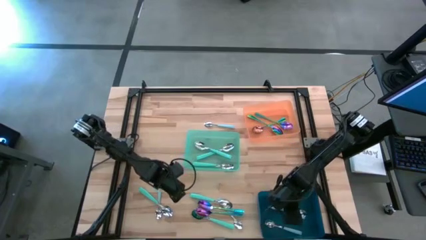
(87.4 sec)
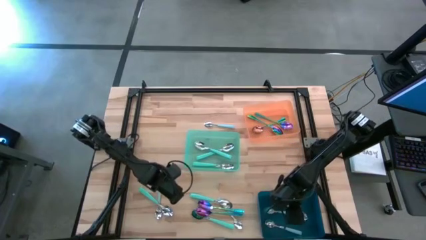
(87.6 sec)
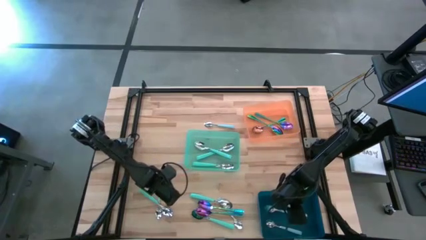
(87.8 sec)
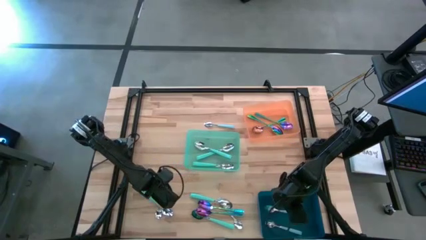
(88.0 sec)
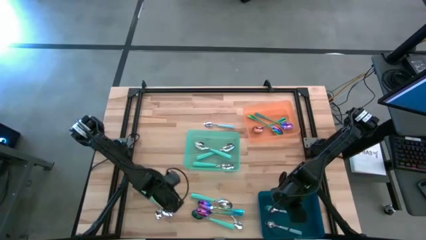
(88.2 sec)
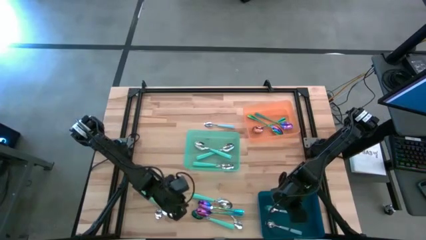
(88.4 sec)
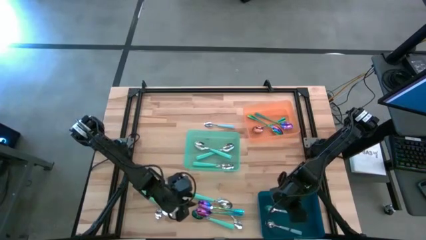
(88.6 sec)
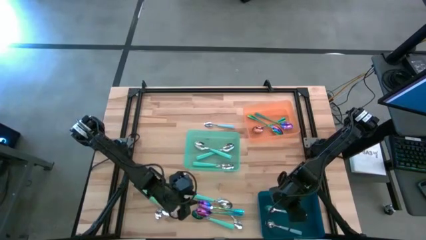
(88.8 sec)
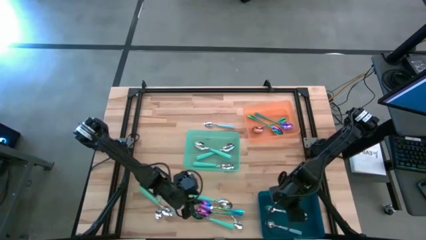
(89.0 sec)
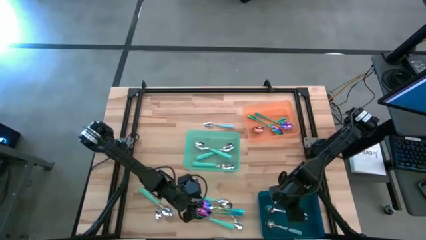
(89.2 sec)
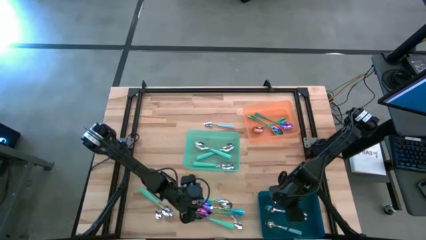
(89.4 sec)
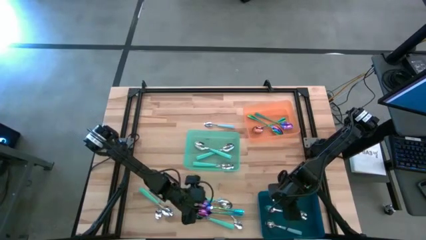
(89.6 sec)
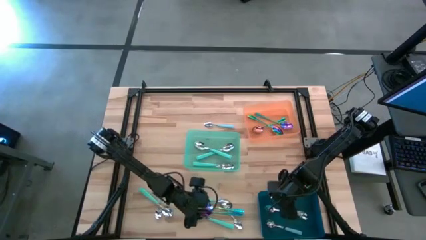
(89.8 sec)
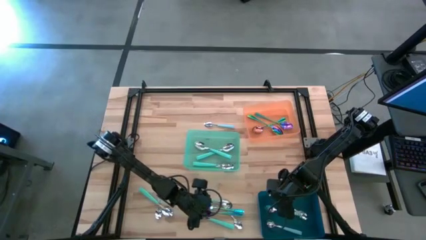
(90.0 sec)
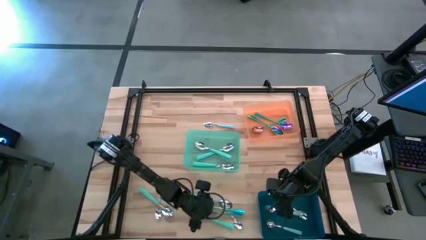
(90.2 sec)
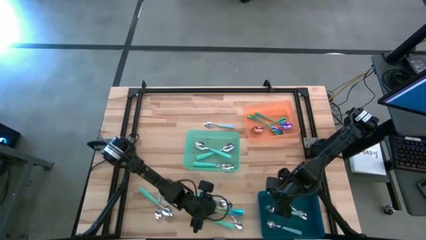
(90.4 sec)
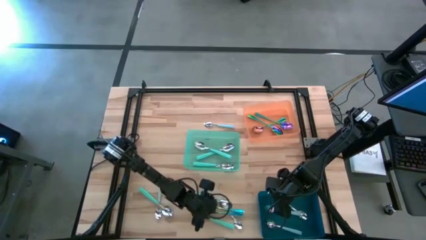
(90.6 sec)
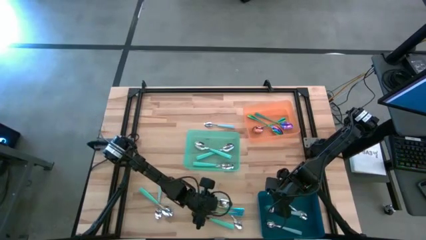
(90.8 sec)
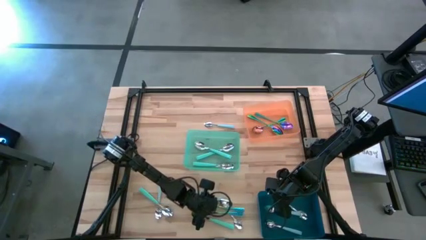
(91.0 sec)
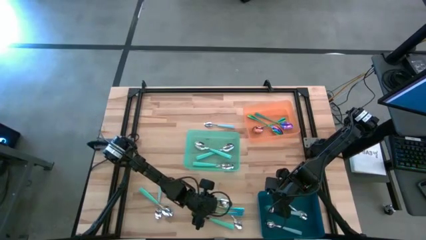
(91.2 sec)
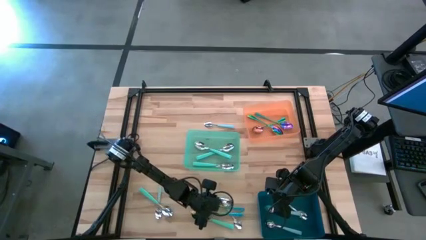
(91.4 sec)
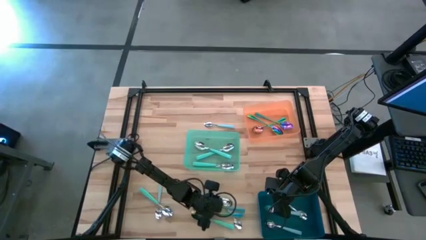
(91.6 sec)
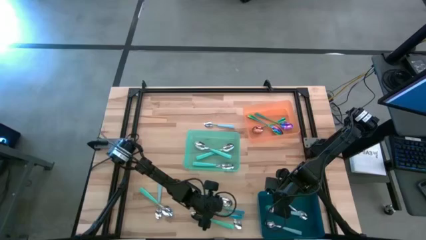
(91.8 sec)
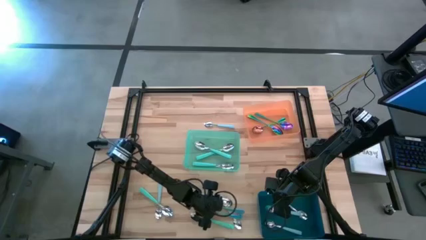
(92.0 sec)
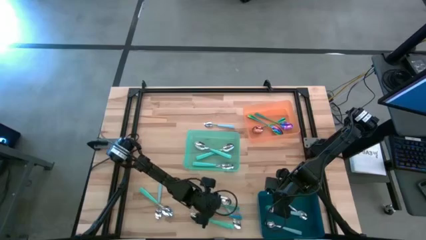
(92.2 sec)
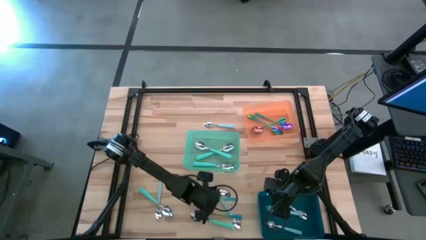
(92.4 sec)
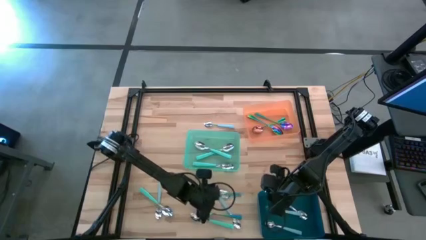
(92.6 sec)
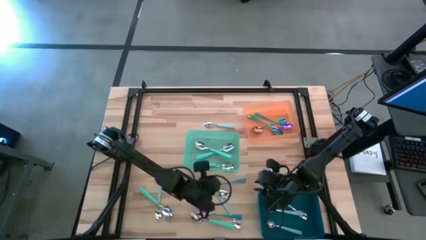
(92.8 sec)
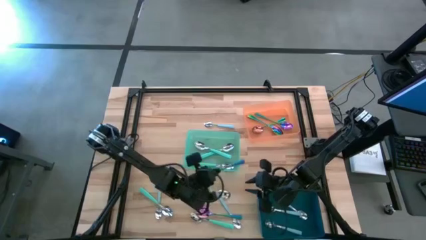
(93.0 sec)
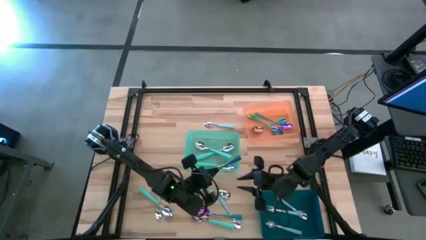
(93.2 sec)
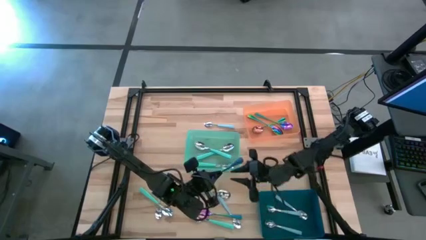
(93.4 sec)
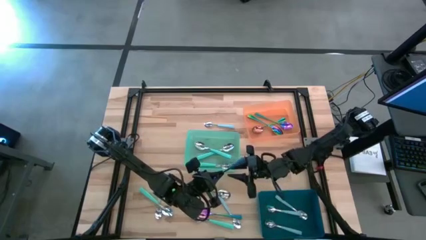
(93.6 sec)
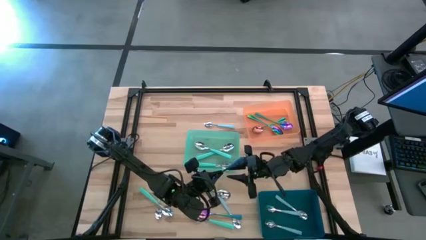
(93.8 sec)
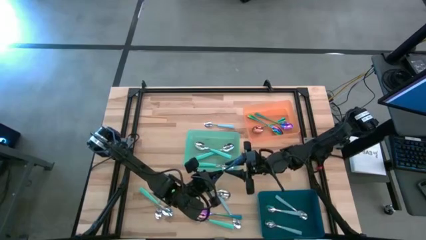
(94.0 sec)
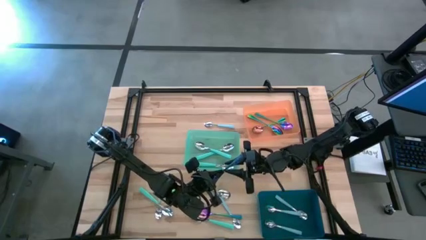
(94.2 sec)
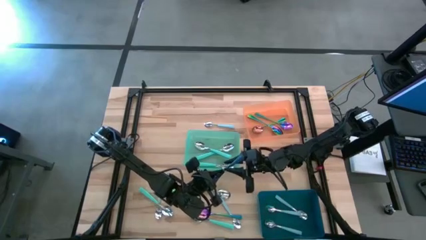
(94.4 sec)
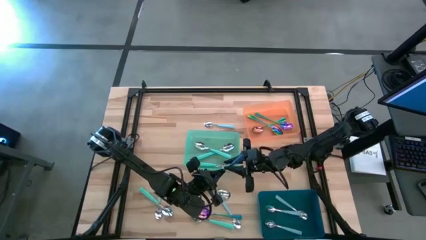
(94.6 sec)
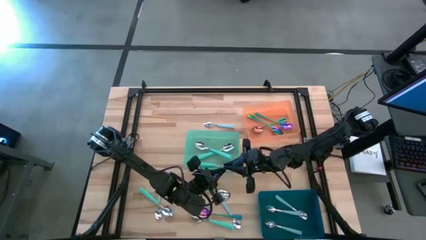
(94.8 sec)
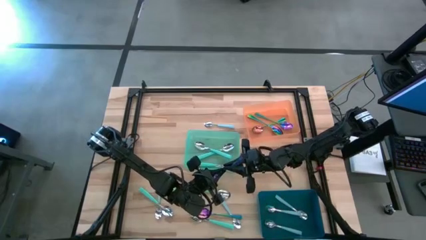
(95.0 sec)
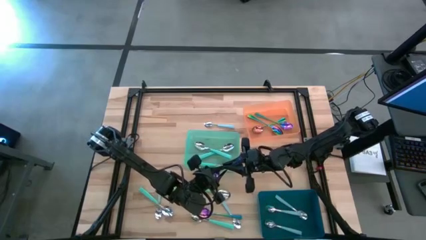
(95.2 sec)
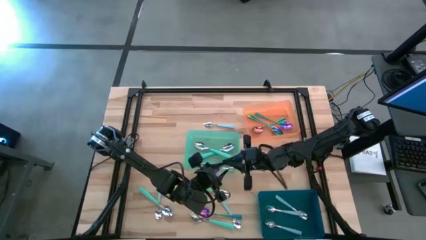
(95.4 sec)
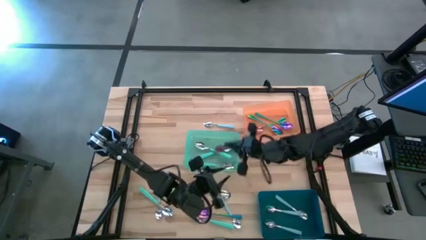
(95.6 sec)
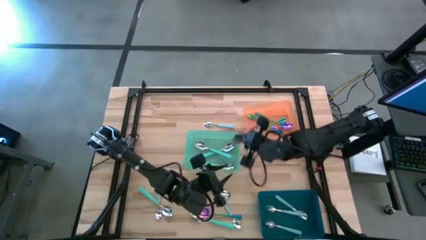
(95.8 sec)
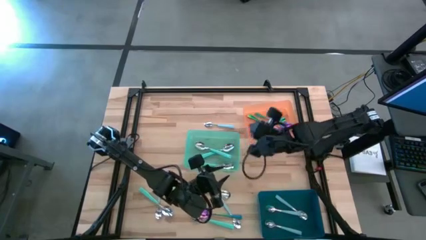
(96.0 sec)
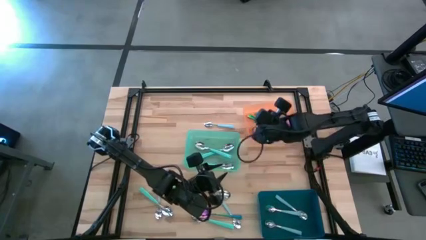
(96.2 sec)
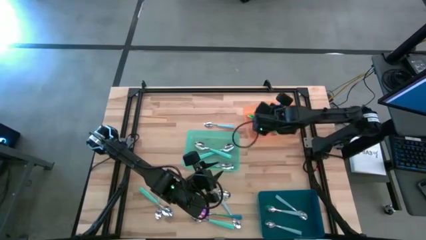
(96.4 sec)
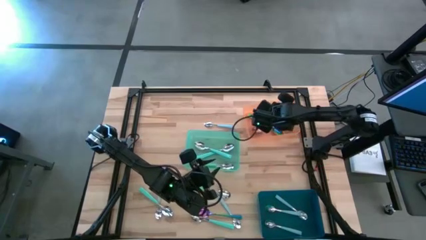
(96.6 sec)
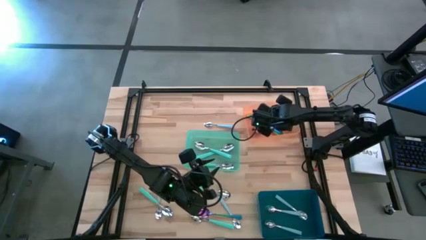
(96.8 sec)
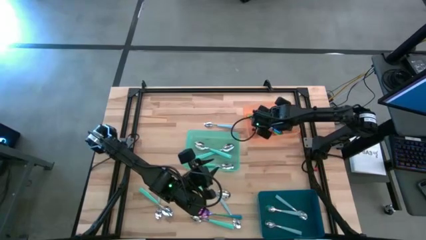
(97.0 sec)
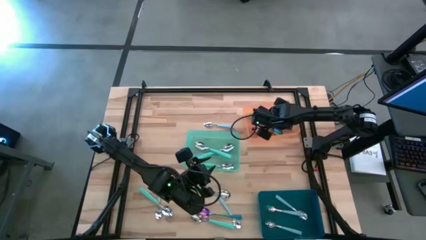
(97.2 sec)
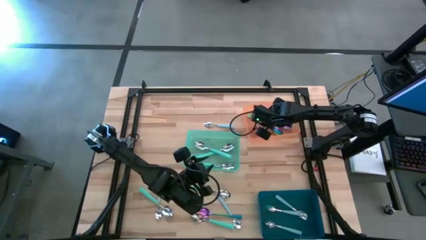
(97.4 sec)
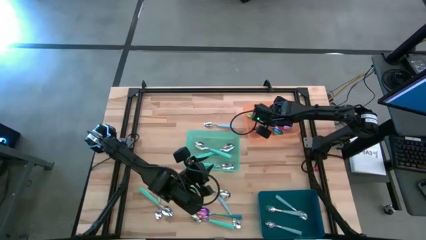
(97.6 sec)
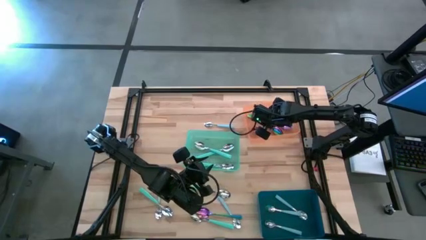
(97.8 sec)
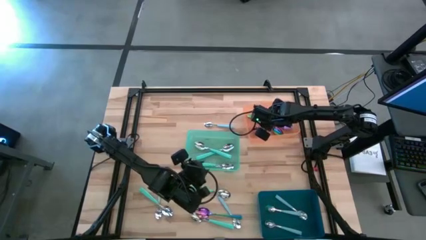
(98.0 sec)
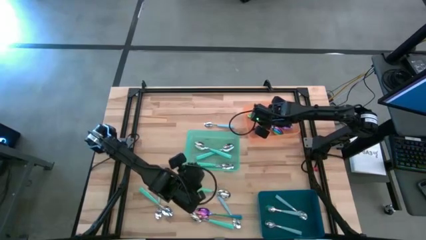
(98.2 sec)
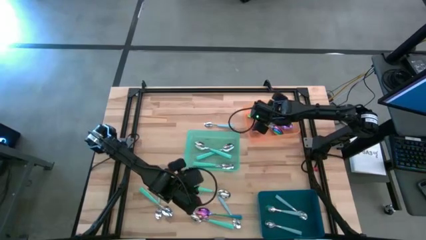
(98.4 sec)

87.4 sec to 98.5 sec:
Task: Sort silverware by color (type)
Put the violet spoon into the orange bin

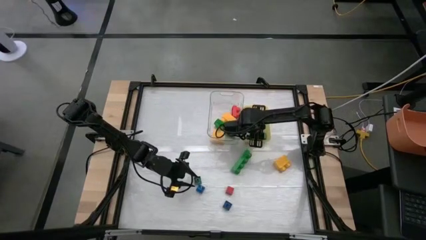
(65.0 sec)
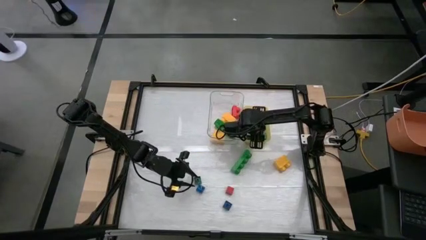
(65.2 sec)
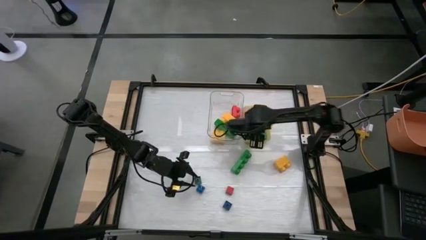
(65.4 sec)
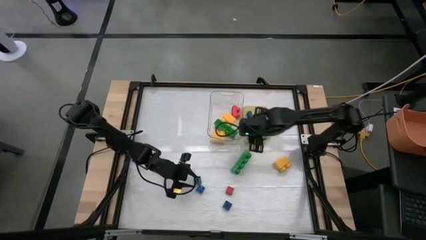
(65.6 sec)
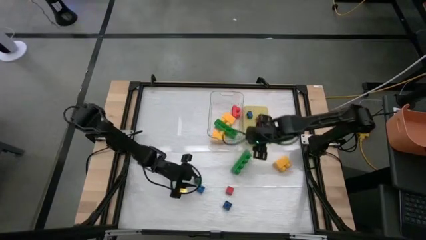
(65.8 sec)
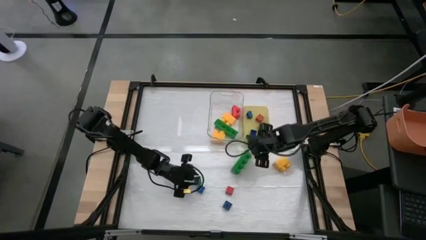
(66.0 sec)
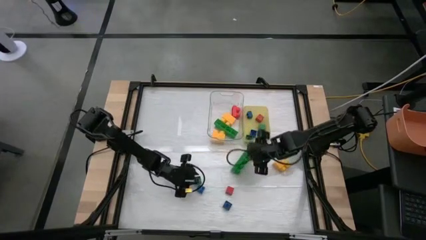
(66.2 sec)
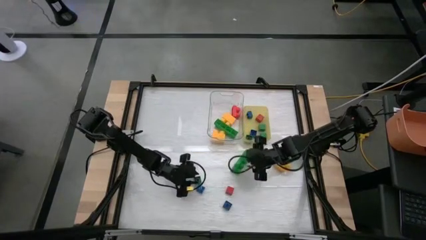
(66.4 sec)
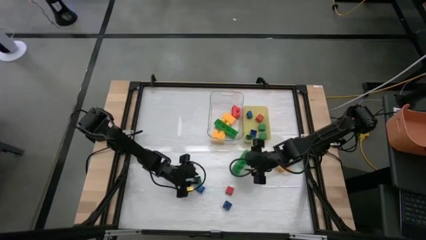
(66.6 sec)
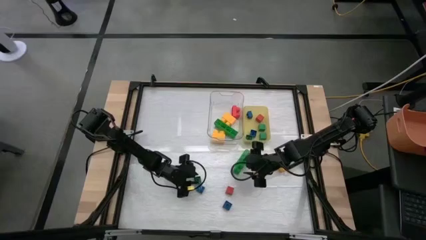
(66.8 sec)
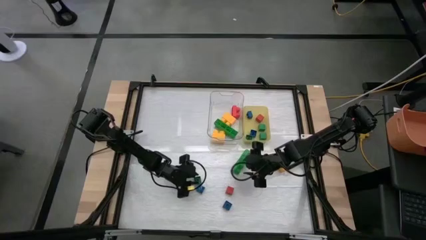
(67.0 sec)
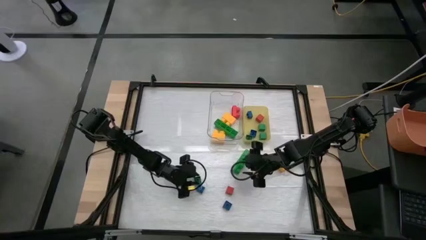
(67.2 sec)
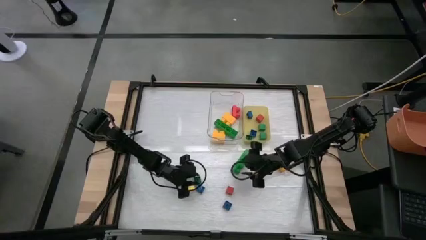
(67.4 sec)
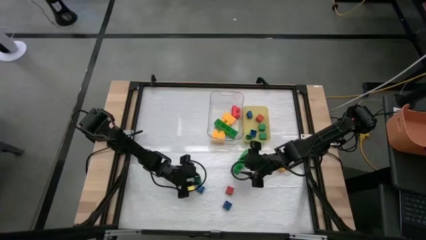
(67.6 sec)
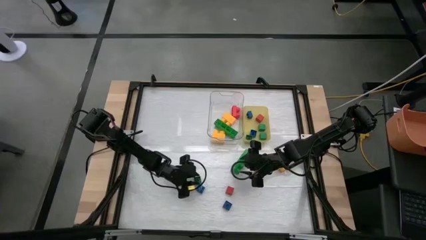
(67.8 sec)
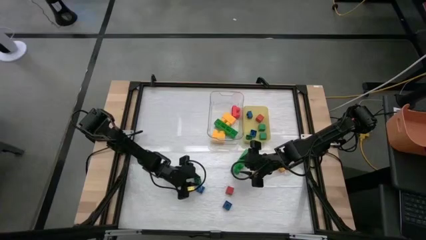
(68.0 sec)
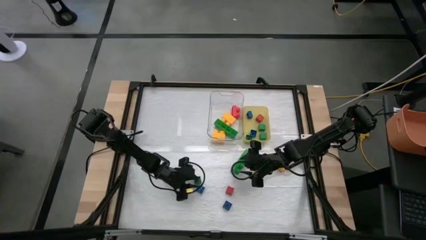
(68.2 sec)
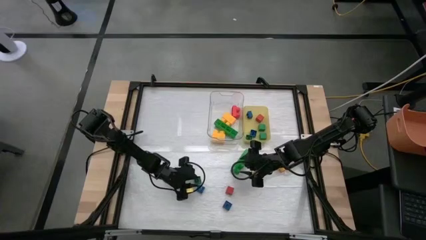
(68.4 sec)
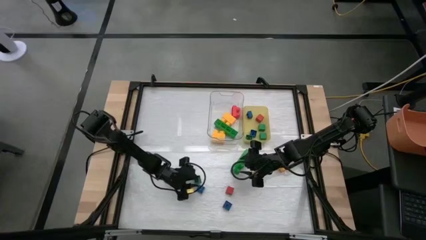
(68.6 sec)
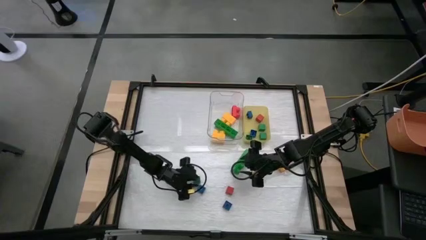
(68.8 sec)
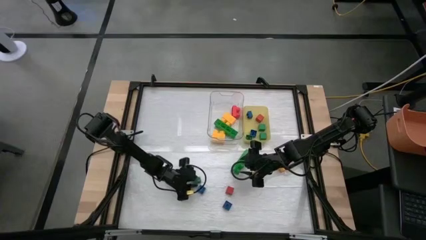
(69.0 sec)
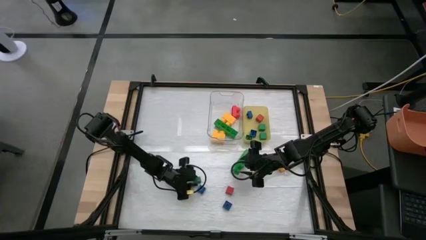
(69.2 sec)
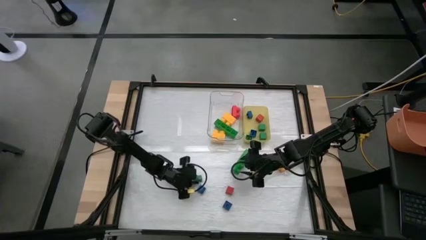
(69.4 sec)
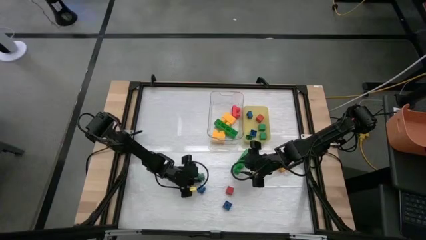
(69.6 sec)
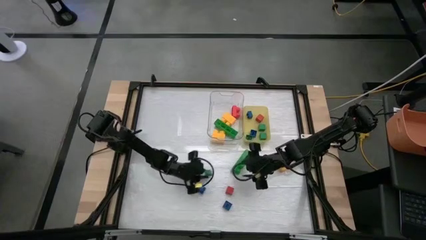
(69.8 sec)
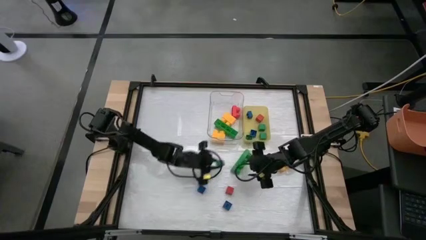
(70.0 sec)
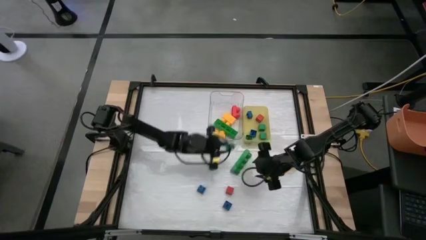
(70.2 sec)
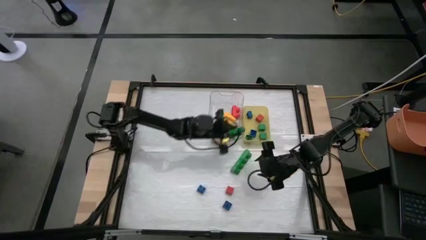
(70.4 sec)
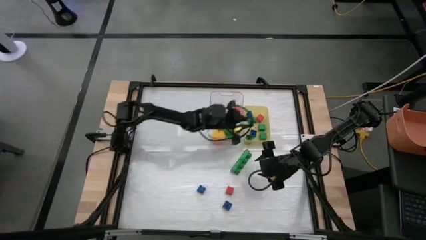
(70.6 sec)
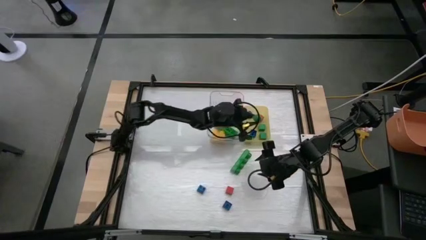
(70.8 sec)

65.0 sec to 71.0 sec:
Task: Sort blocks by size
Put the small green game piece into the yellow bin
